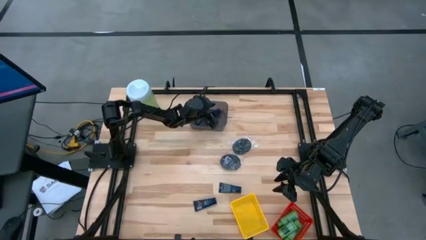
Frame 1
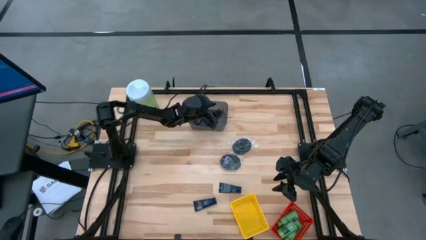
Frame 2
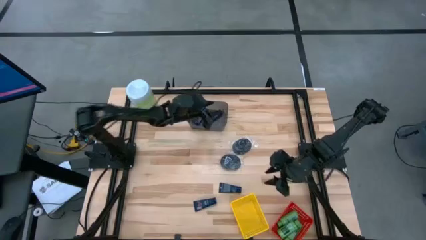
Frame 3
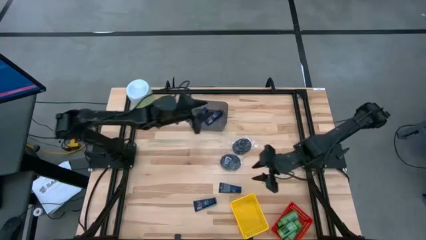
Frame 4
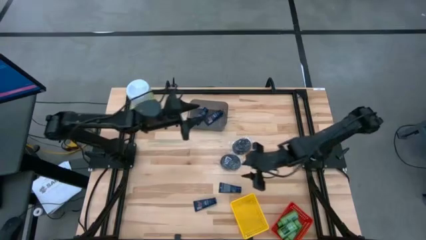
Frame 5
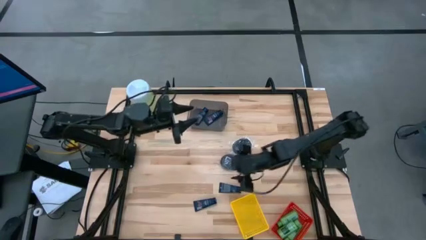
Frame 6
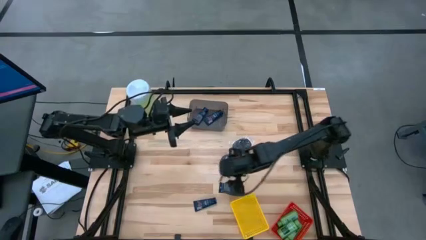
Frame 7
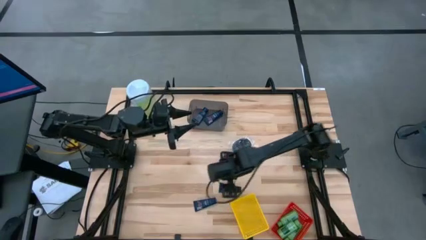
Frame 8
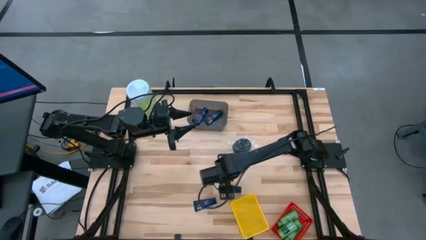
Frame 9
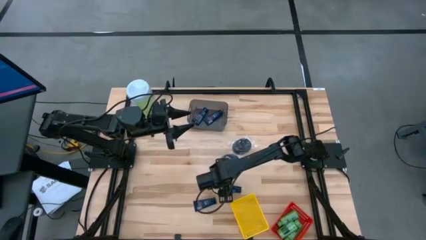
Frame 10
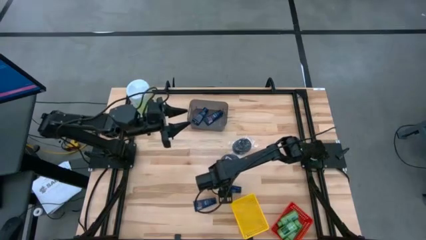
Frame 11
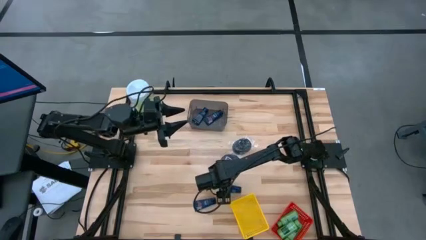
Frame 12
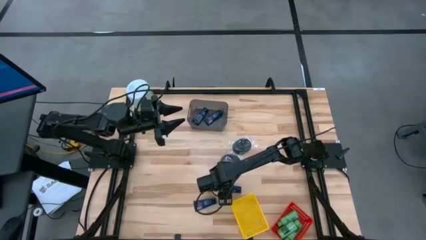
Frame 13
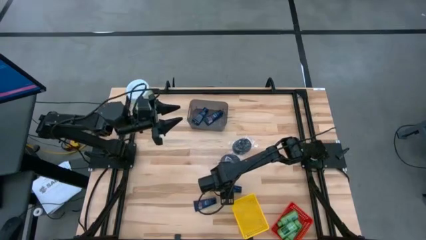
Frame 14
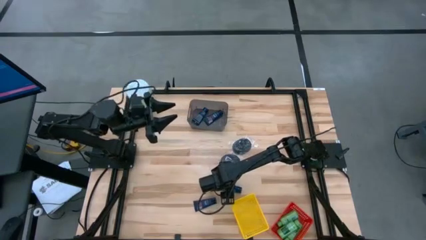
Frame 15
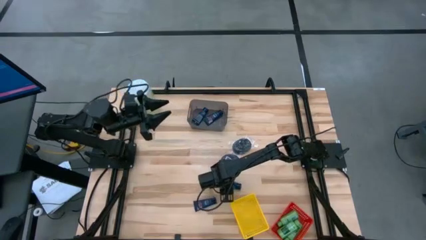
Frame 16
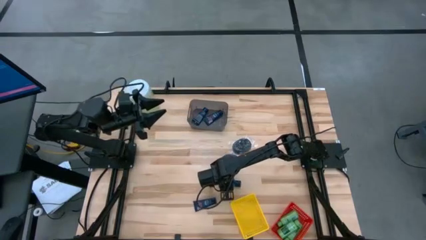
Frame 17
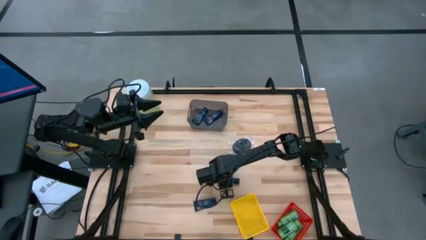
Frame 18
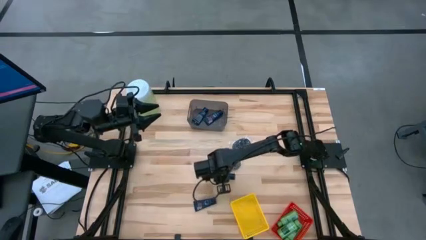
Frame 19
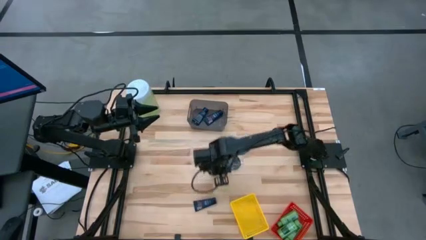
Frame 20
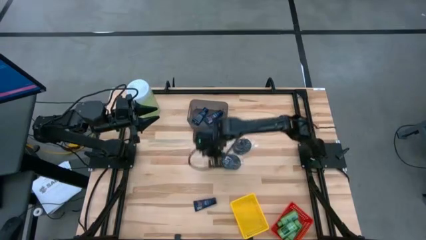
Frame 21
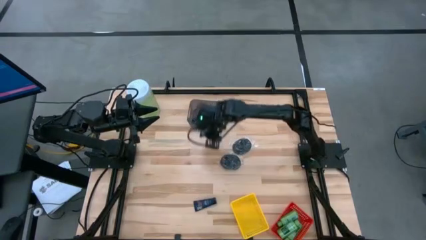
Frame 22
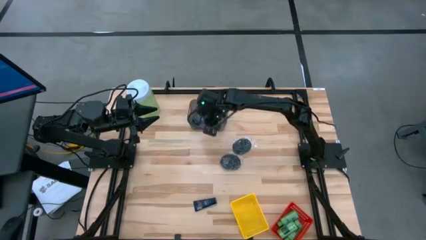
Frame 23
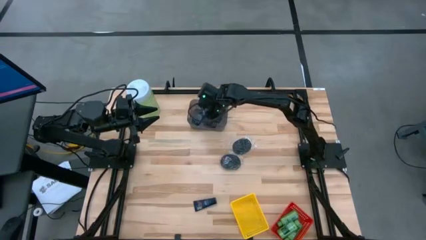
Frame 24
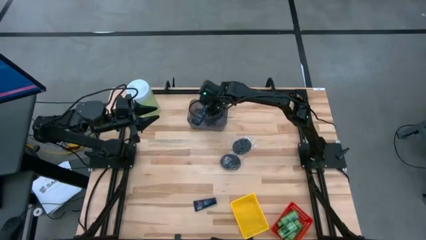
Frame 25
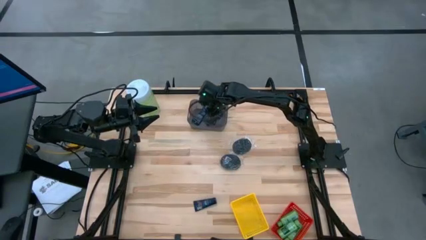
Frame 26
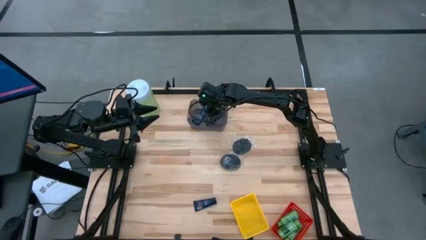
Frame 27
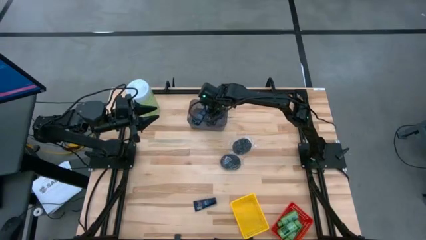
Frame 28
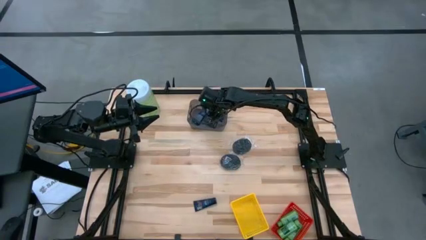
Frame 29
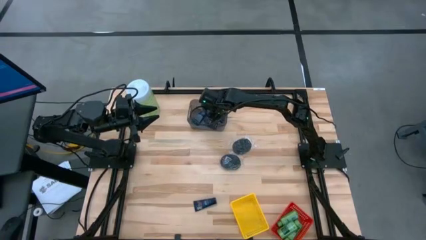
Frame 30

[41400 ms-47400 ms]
Task: Pick & Place Travel size toiletries
Put the black shave cream on the black bin

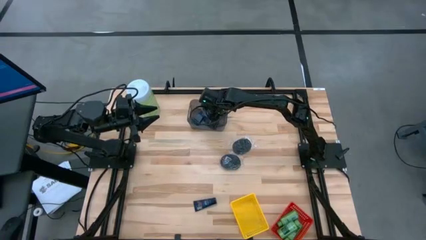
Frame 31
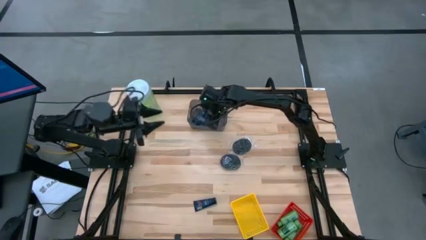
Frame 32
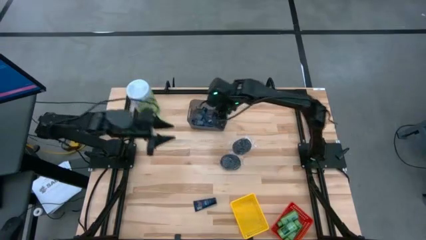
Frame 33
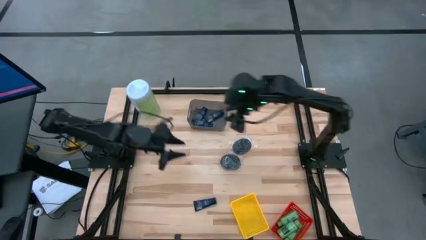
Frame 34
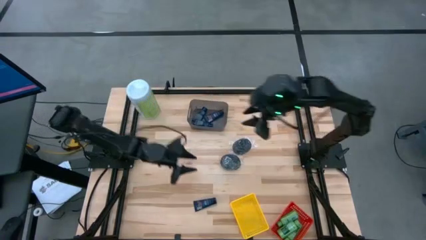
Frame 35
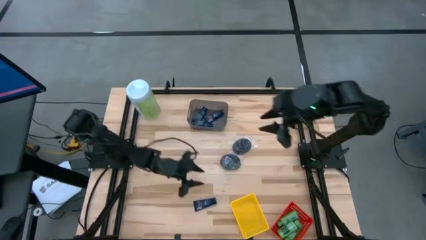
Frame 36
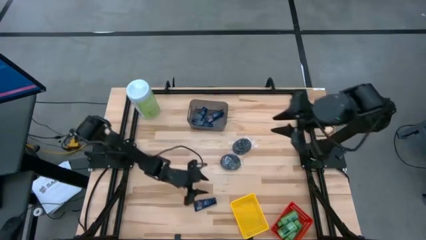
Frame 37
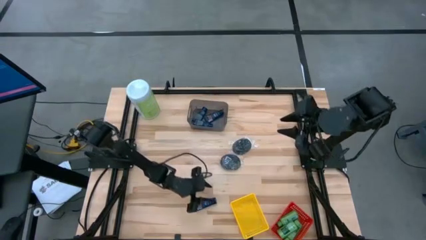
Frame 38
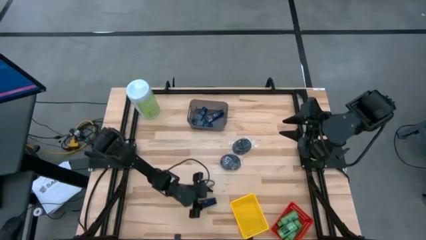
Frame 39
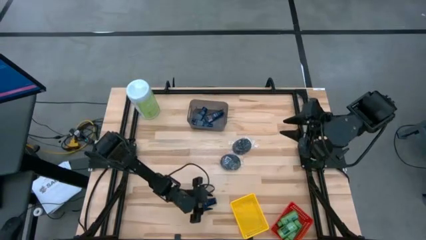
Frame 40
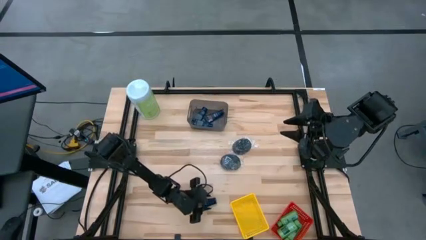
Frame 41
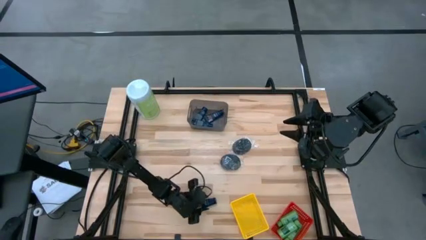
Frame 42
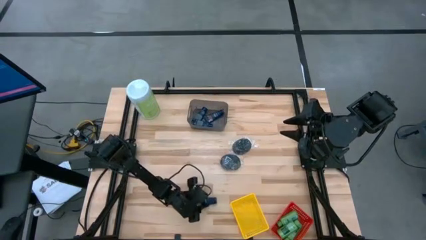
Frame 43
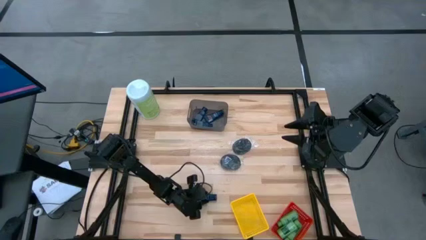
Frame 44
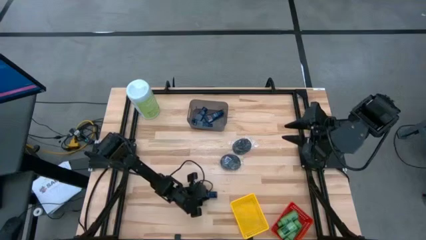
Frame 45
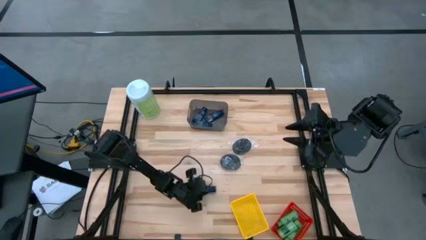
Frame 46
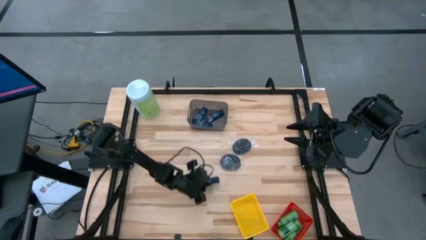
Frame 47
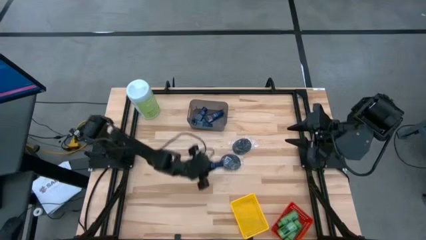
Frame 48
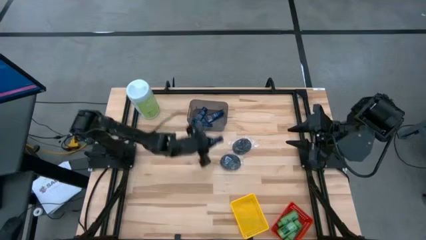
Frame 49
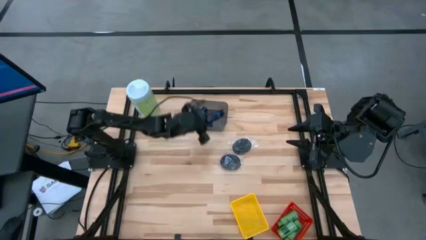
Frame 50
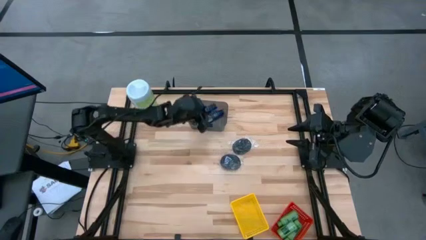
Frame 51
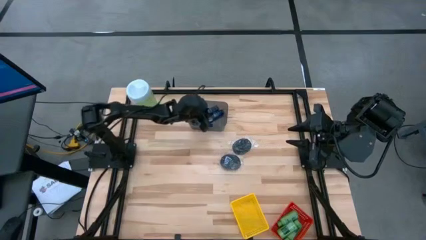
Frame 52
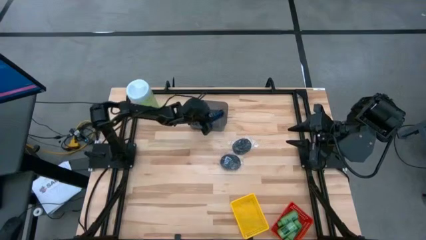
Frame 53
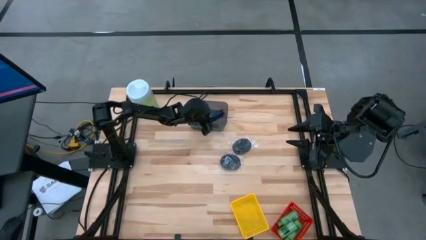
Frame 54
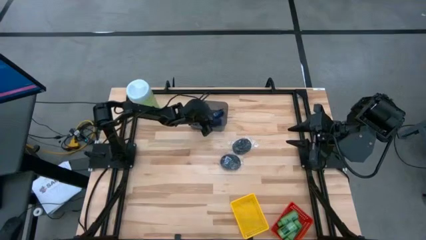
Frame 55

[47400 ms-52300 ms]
Put the black shave cream on the black bin

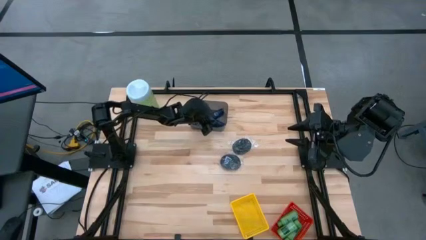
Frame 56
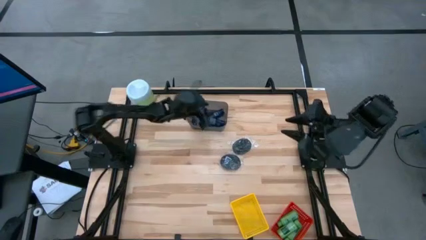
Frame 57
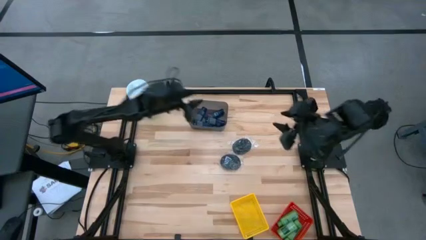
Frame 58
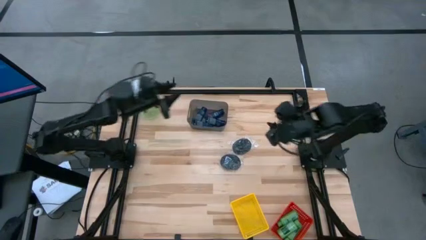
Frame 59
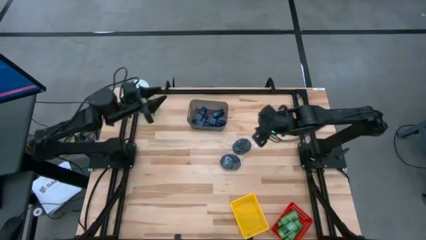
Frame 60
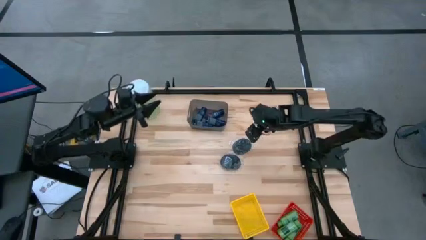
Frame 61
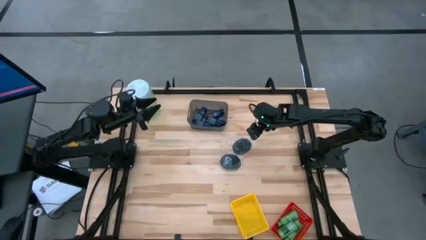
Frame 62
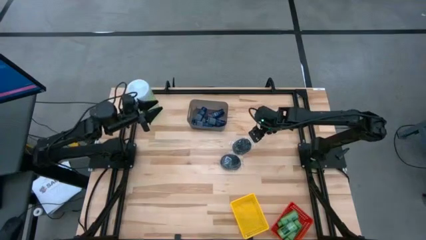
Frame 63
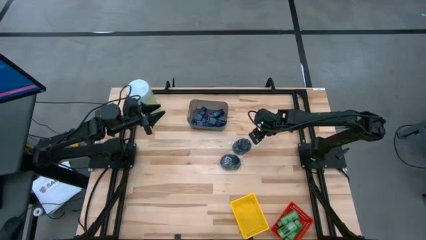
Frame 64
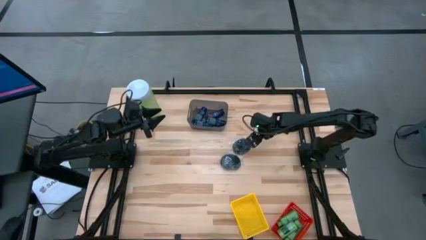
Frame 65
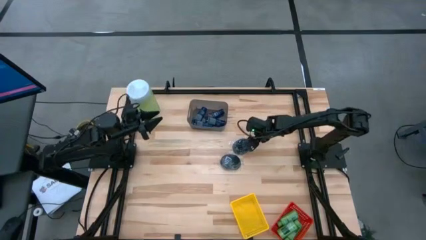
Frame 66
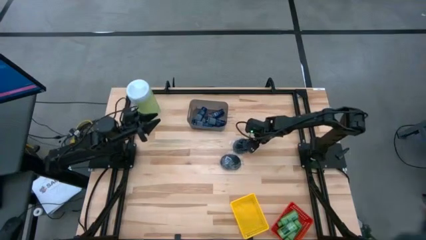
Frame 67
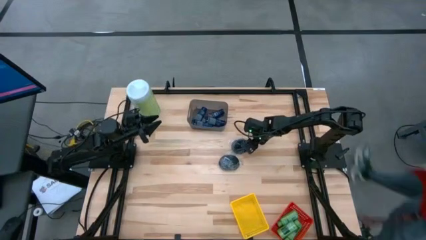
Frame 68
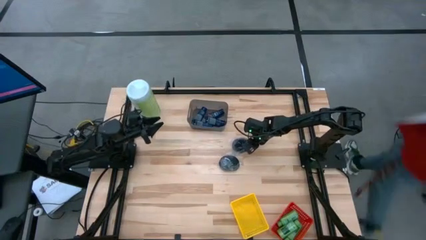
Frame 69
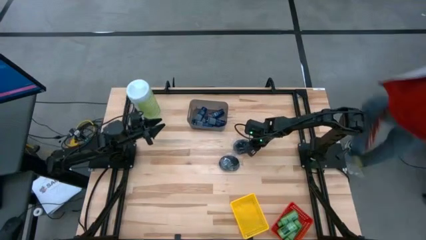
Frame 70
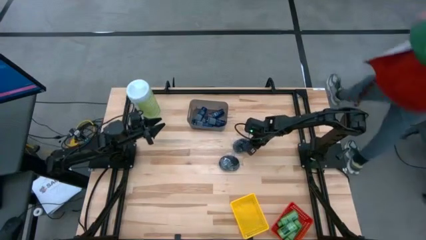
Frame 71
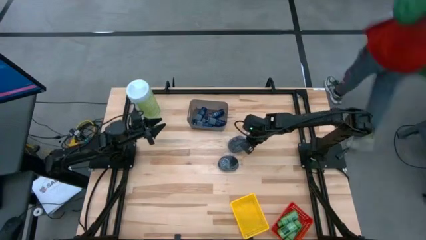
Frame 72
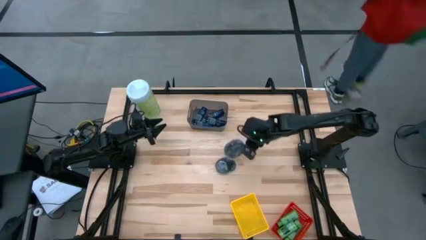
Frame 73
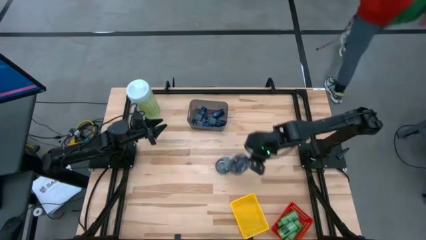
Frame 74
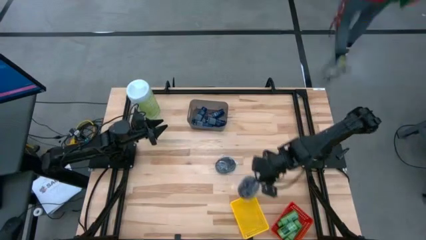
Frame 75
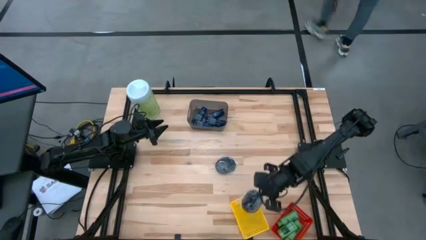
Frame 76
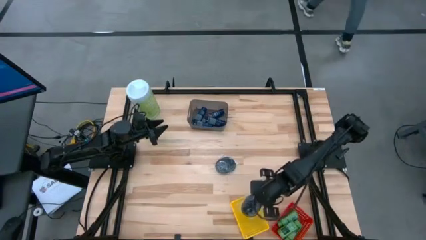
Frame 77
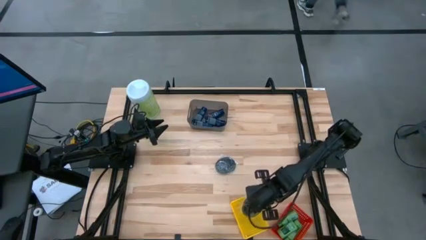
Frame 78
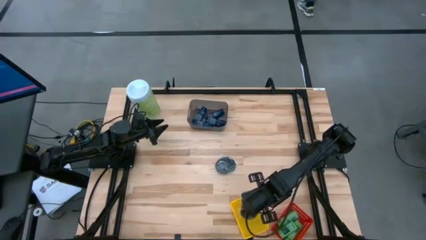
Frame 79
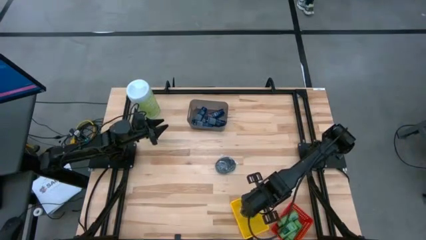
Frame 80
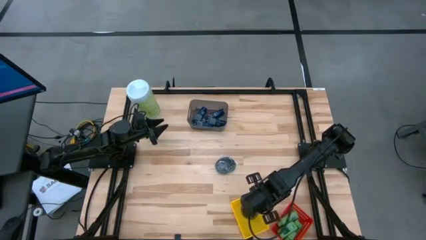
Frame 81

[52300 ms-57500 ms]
Put the black hairbrush on the yellow bin

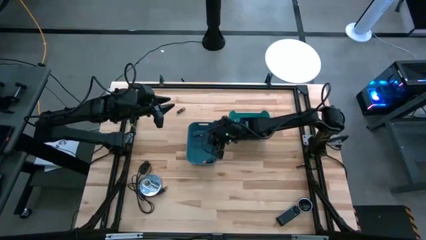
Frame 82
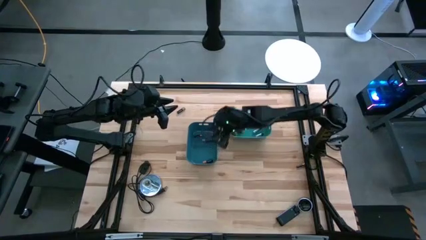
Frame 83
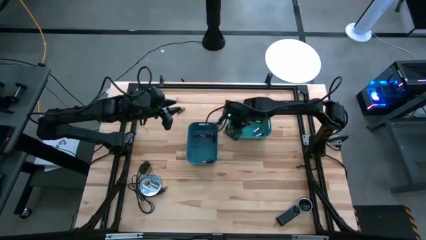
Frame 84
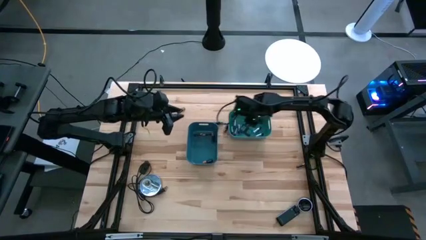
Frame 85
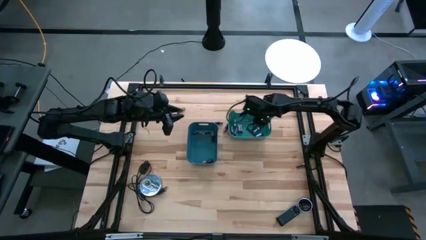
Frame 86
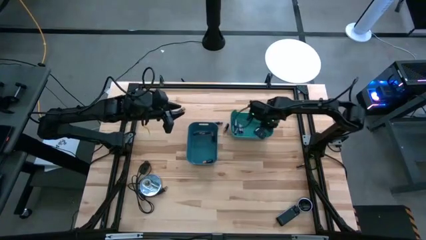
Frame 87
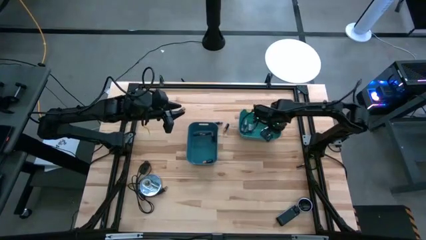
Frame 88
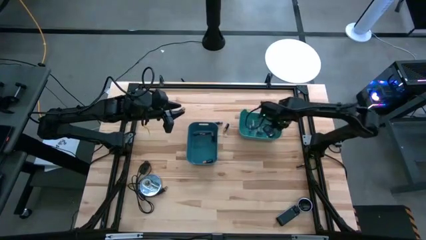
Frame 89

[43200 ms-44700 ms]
Task: Sort batteries
Adjust the green bin
